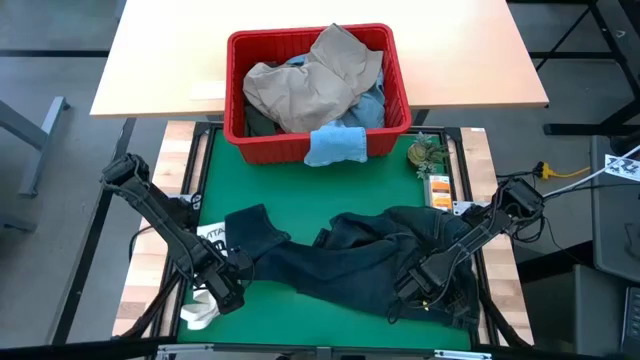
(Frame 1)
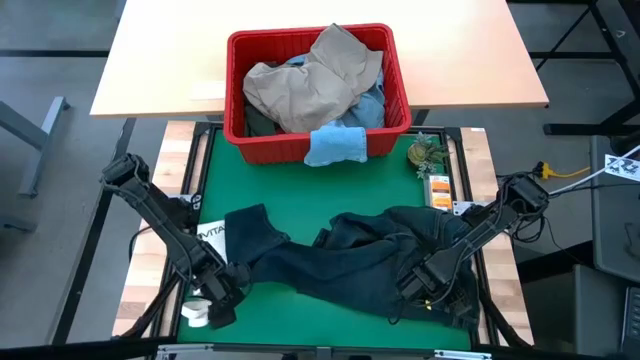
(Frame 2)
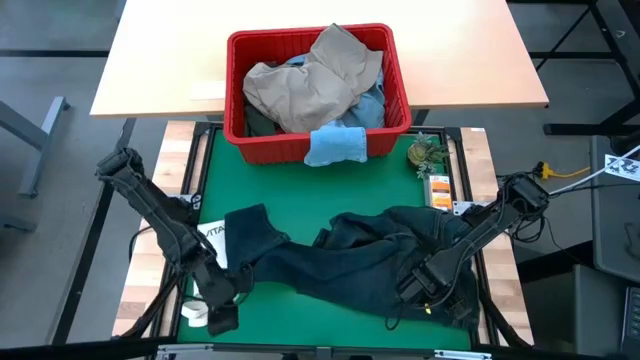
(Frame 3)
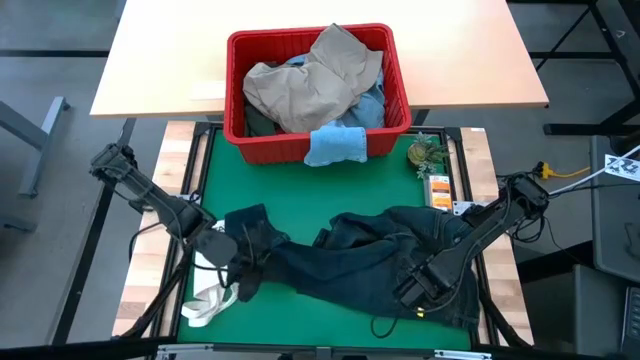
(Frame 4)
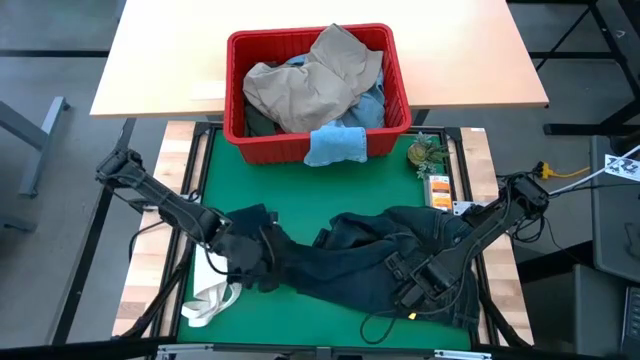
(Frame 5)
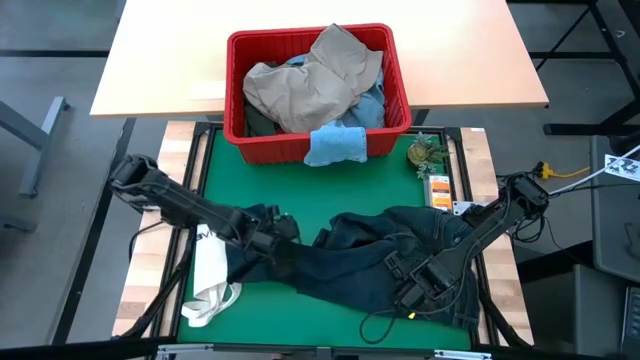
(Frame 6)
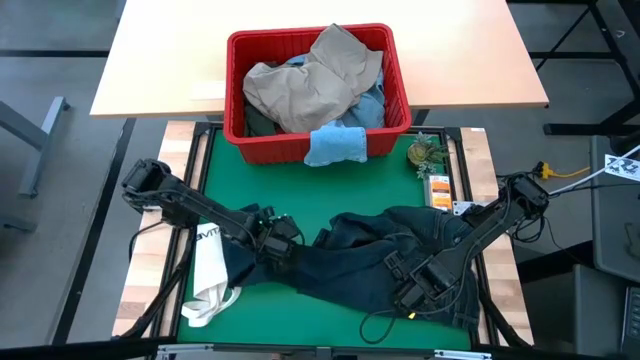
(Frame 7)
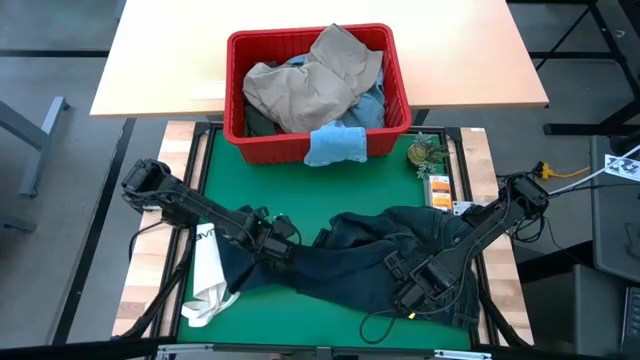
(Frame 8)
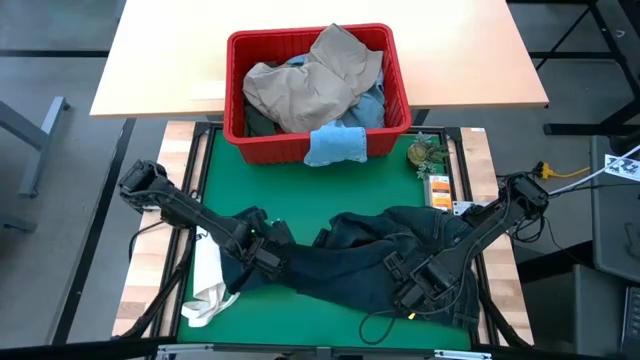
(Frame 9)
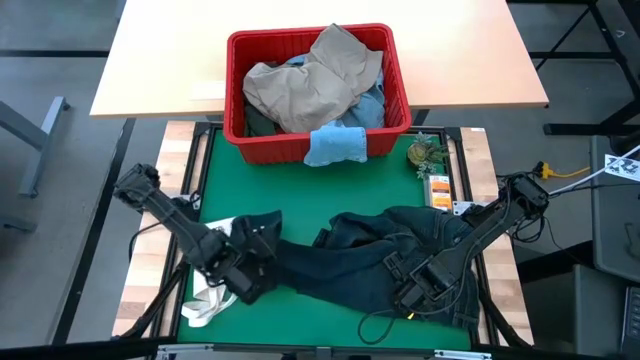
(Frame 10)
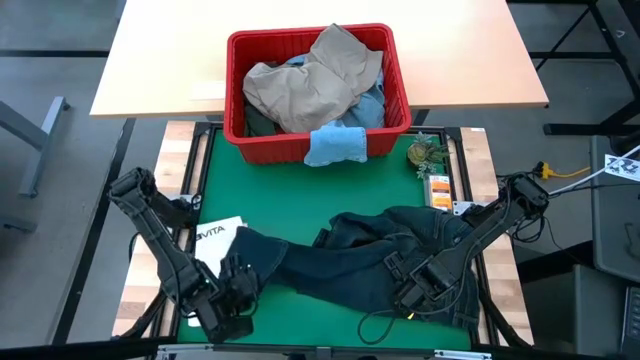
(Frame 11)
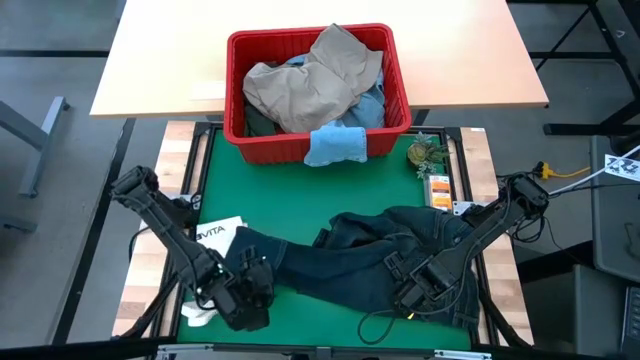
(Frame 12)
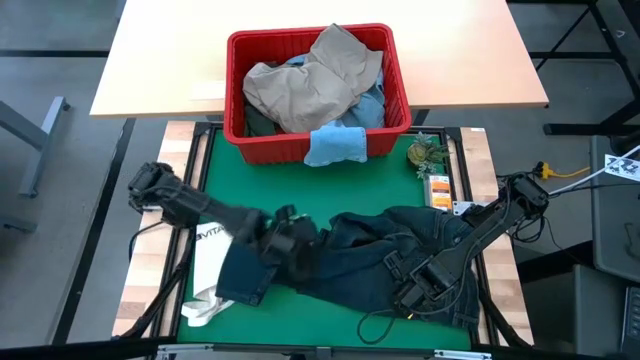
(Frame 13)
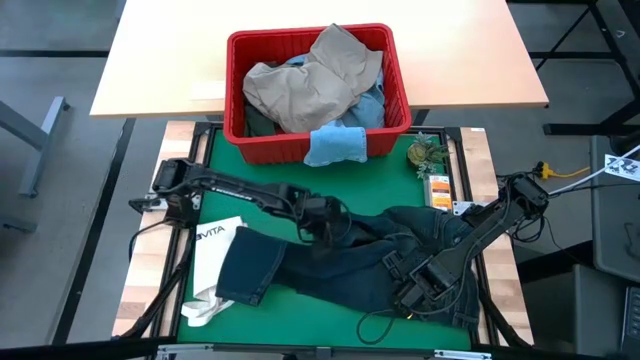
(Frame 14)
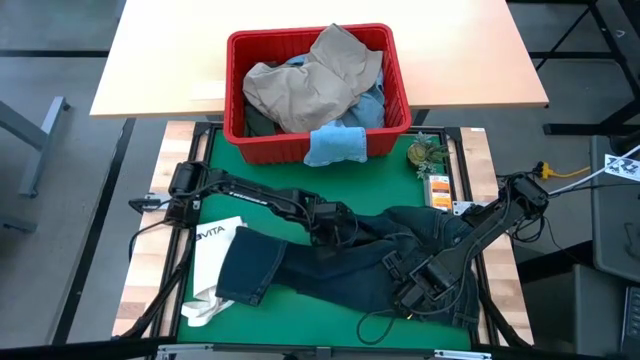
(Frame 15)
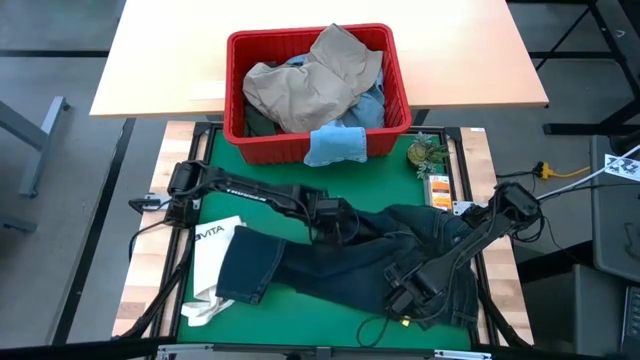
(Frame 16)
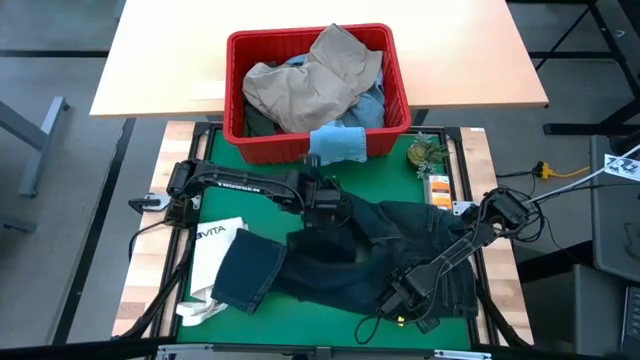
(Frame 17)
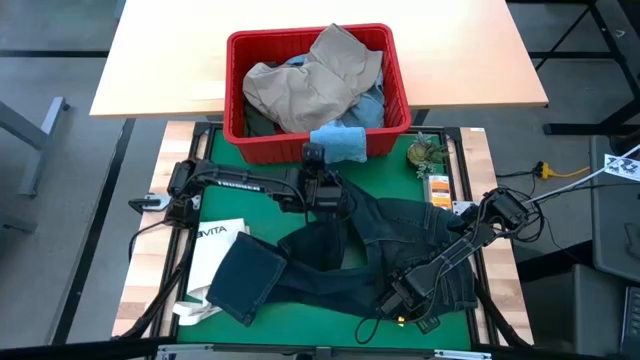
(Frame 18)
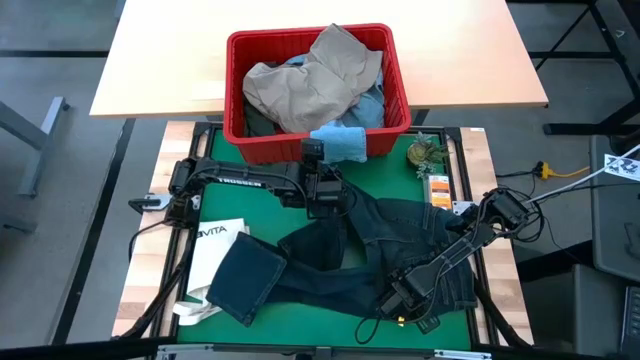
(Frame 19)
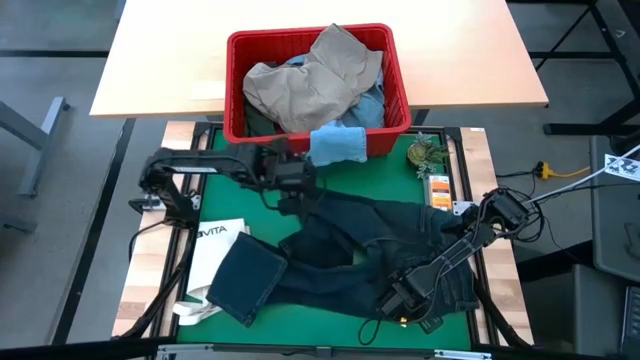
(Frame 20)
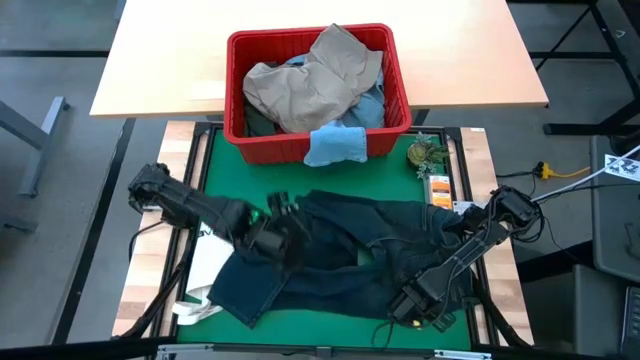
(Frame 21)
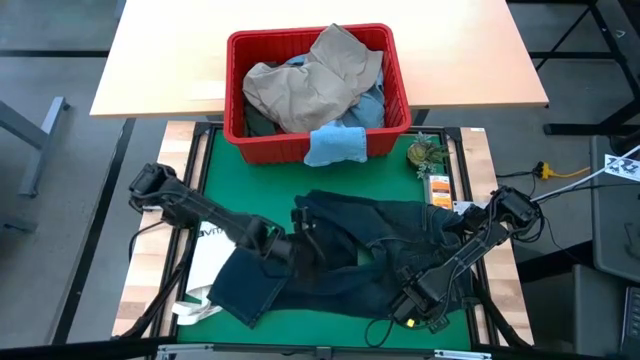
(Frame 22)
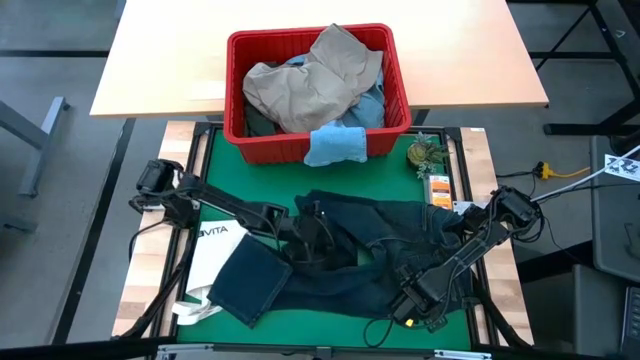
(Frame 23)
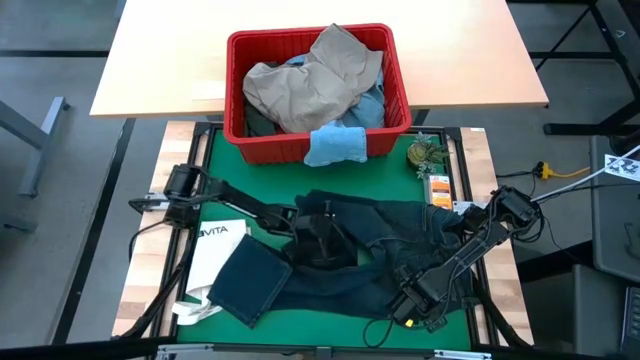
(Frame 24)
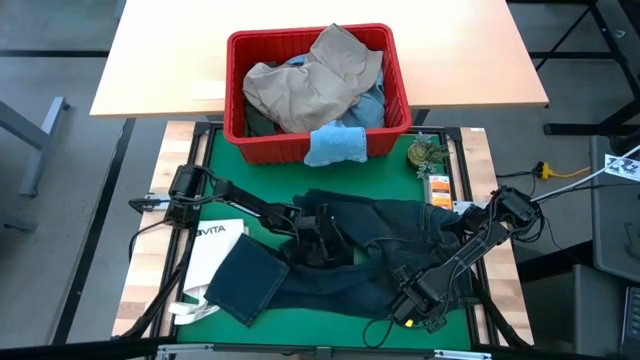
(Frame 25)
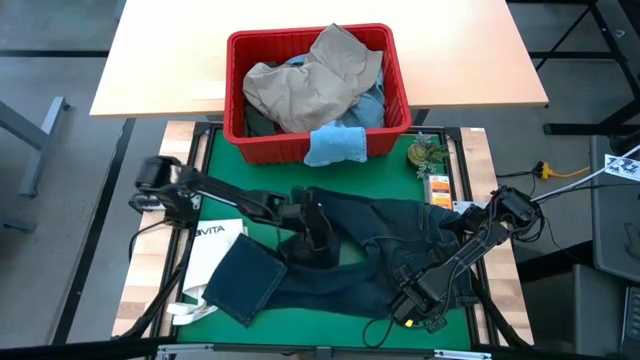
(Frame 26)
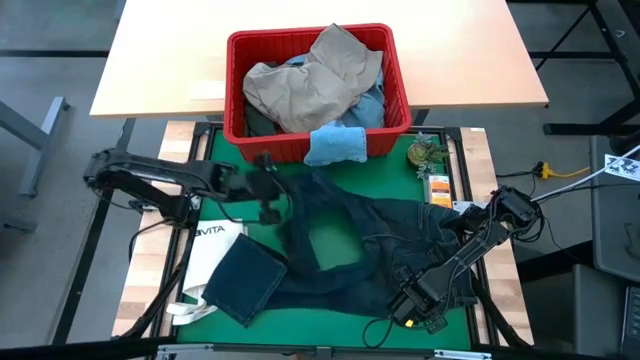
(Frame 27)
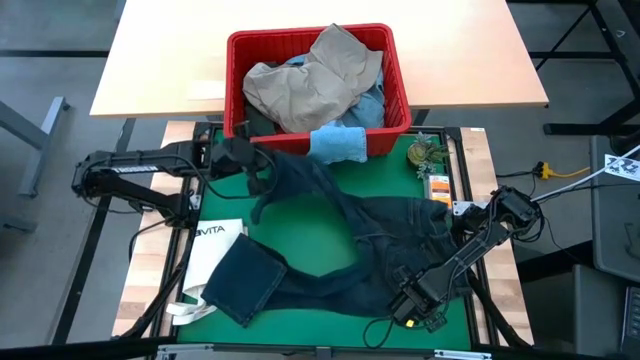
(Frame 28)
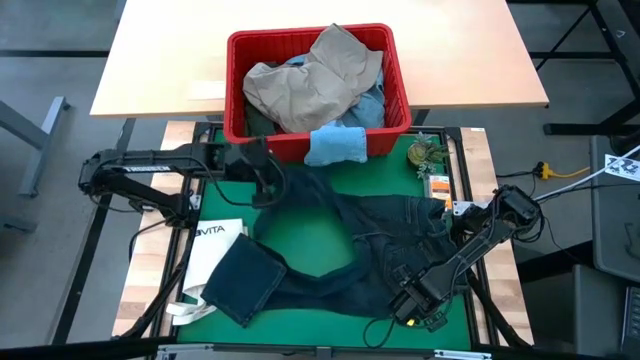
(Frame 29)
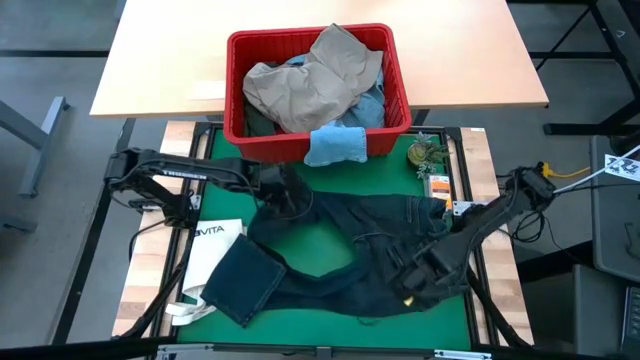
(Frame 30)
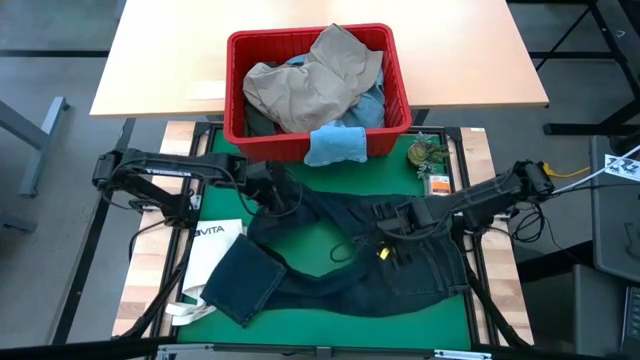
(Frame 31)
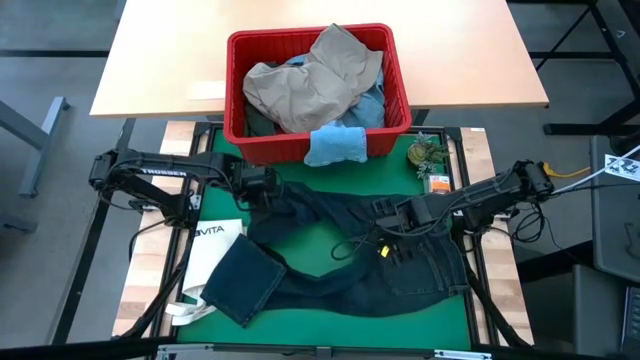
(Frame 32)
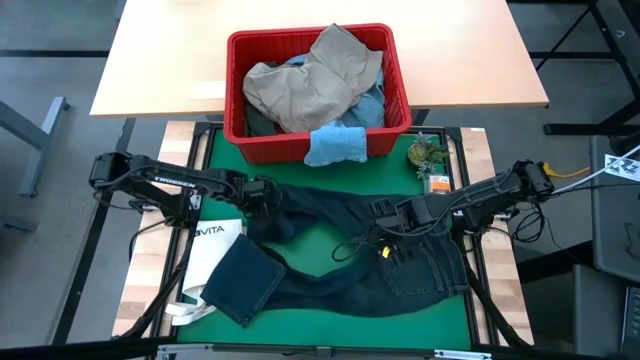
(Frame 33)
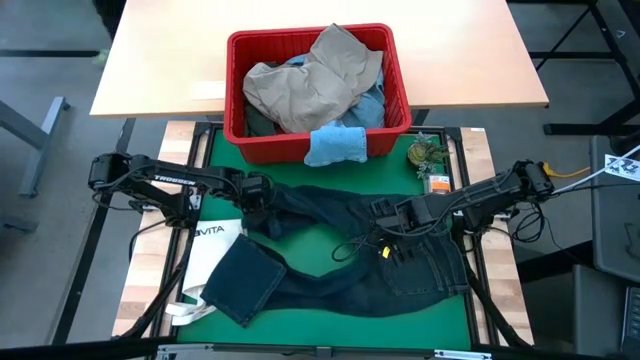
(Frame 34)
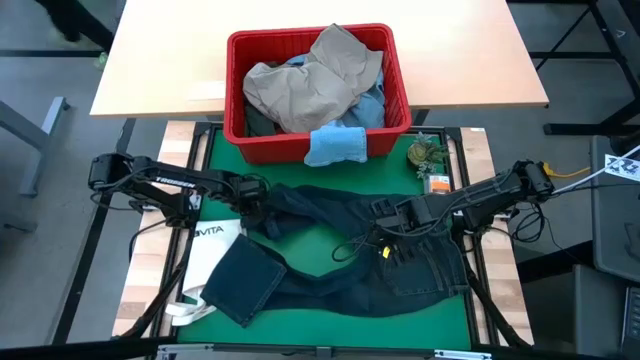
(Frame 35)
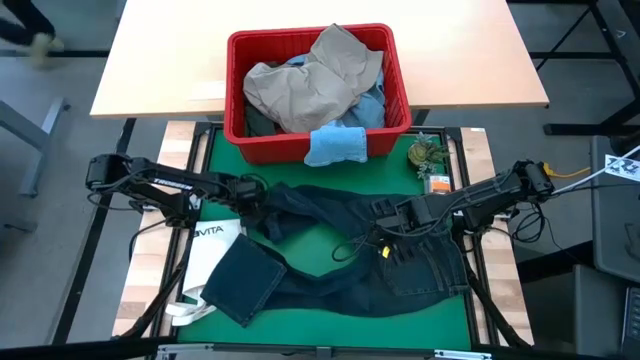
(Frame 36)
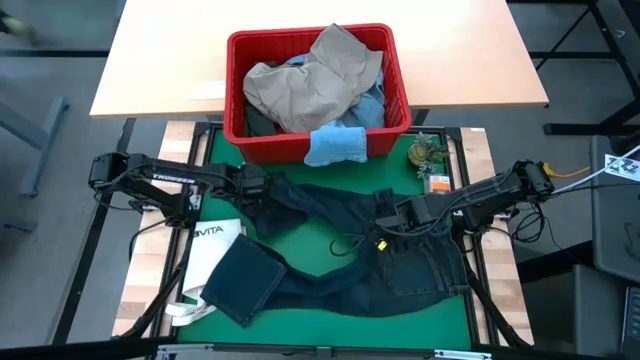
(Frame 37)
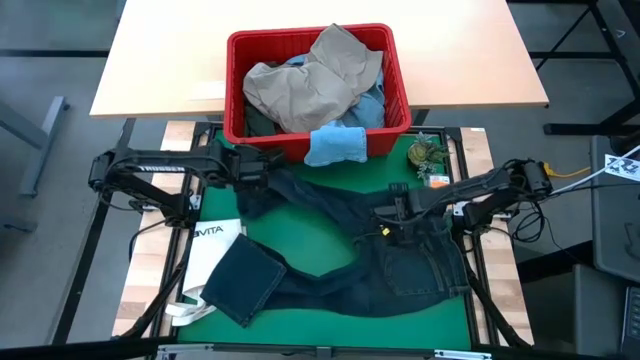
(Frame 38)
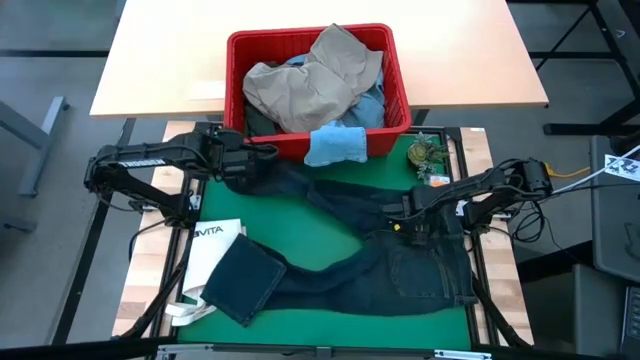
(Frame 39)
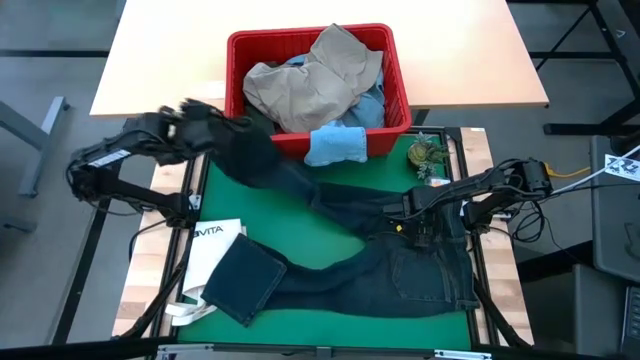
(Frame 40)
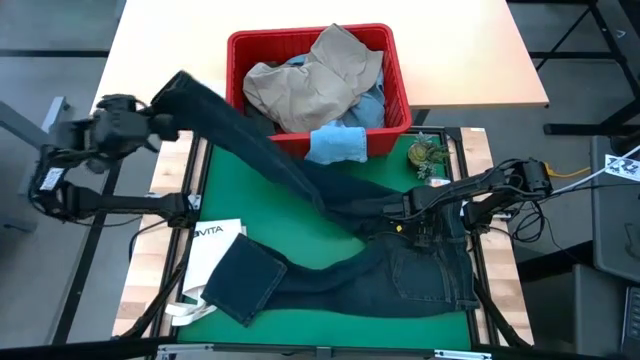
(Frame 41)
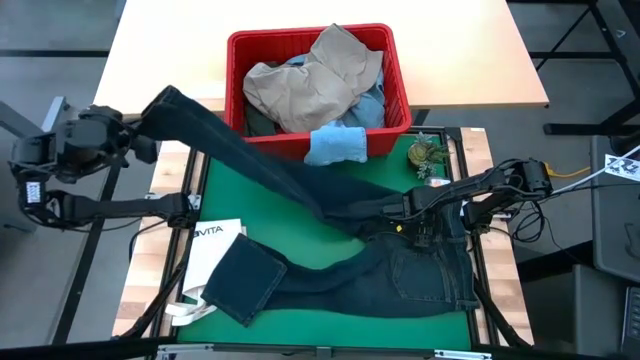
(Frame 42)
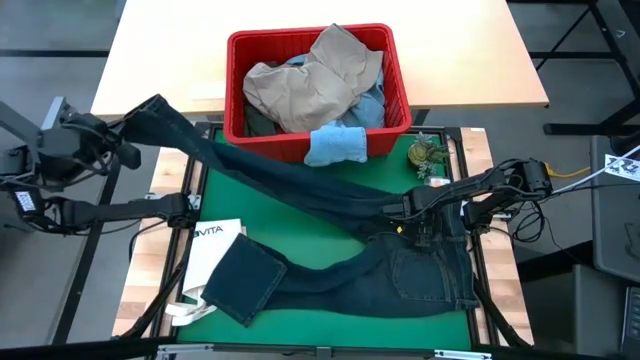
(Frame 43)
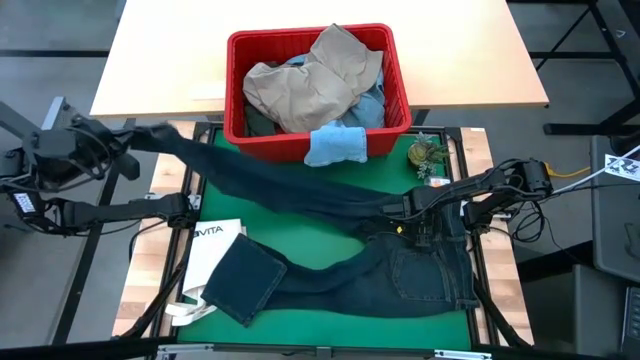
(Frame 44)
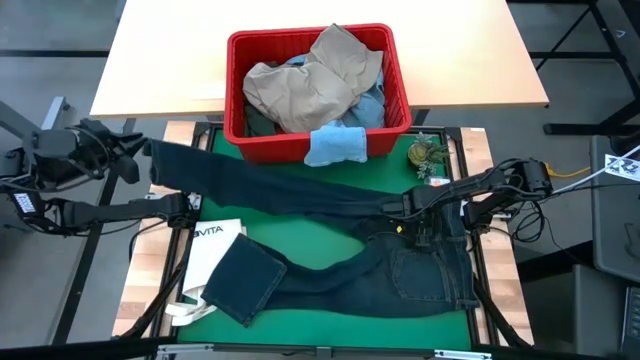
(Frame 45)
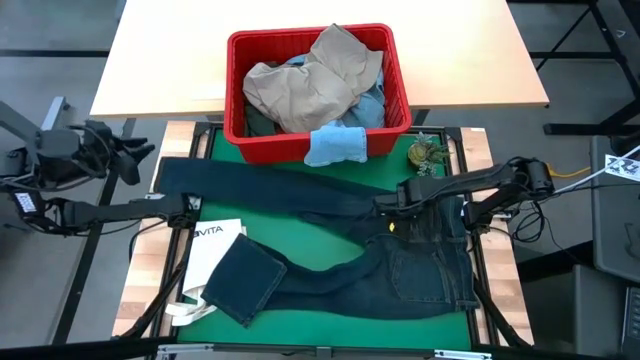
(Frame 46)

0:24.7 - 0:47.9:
Task: Fold Laundry from Bin
Fold the dark blue pants
